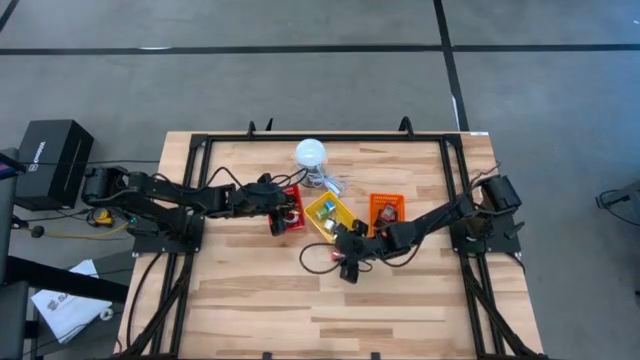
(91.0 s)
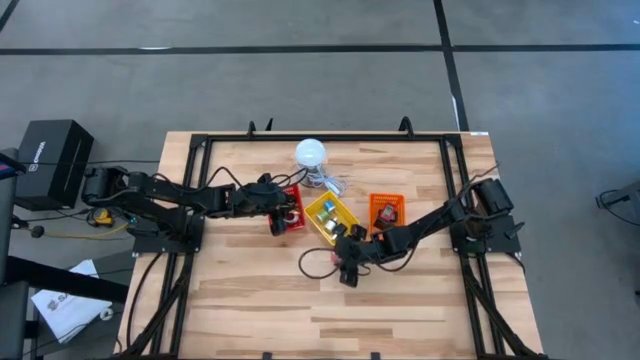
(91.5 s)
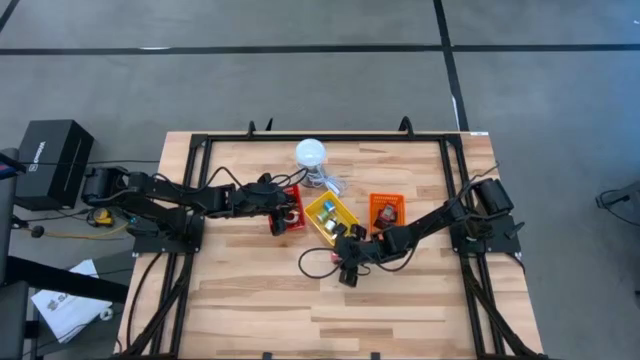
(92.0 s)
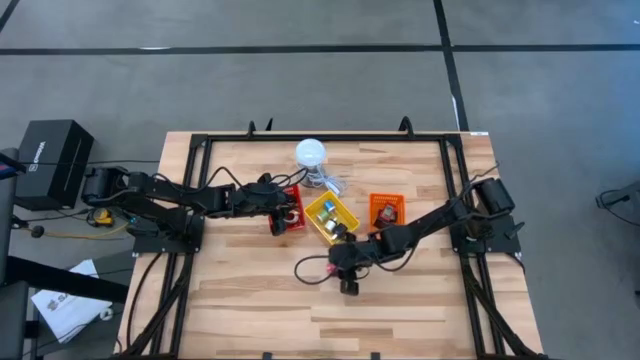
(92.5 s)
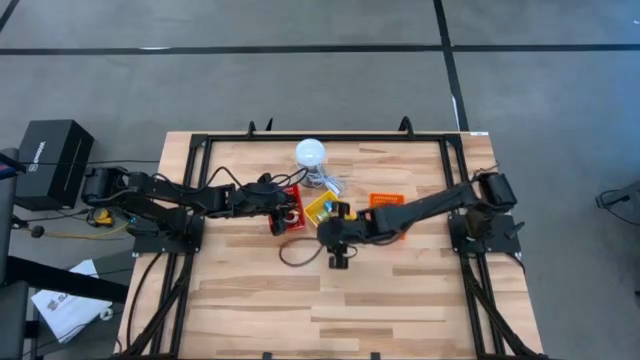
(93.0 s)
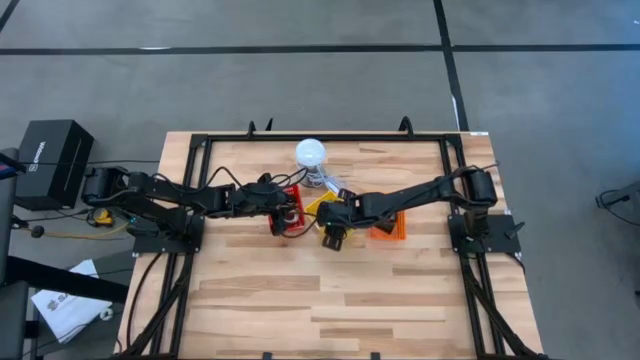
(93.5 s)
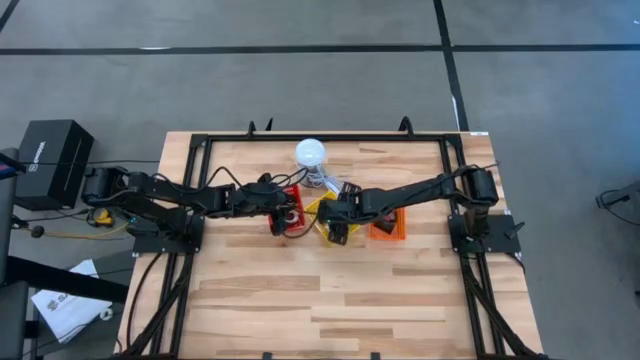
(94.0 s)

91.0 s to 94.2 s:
Task: Pick & Place Office items
Put the pink charger adapter into the yellow basket

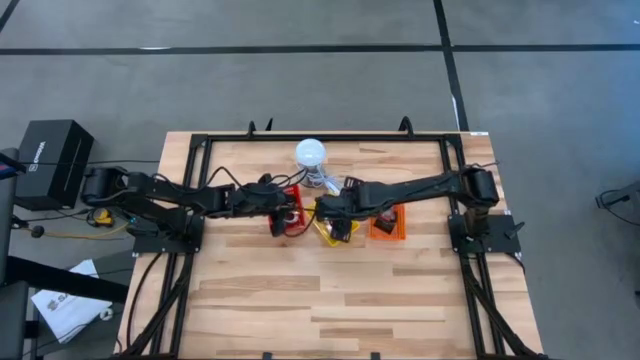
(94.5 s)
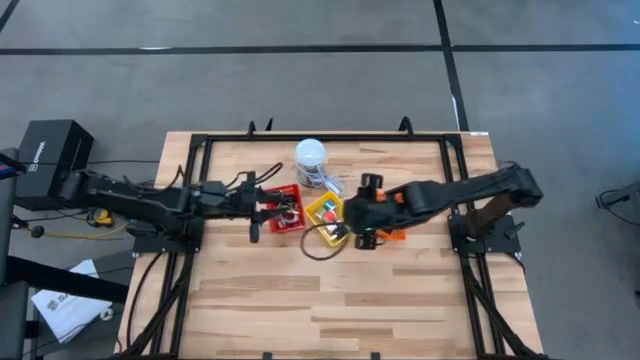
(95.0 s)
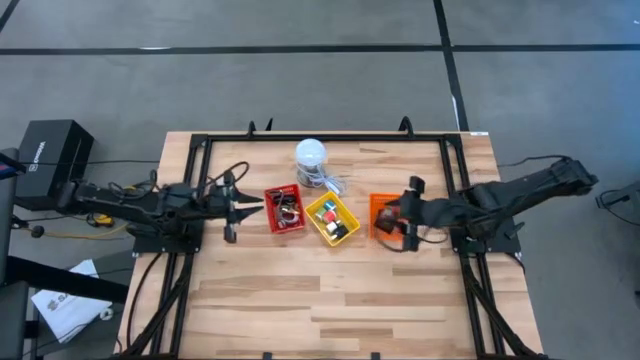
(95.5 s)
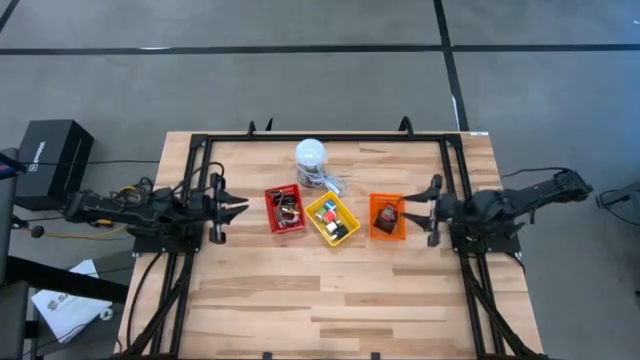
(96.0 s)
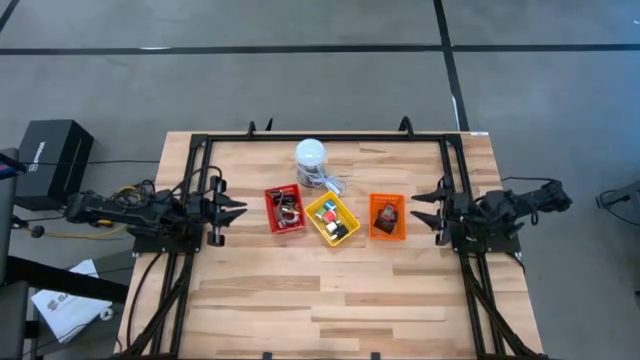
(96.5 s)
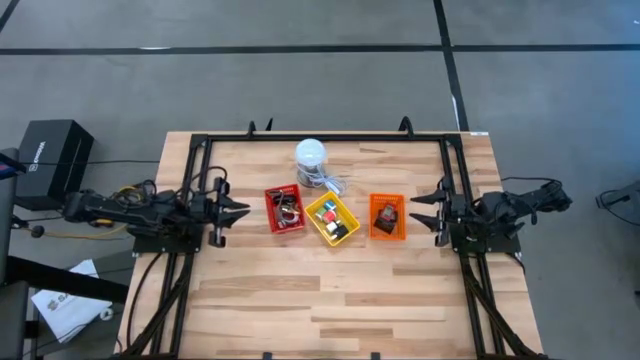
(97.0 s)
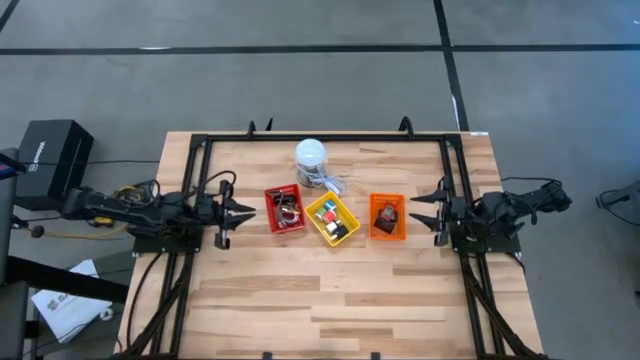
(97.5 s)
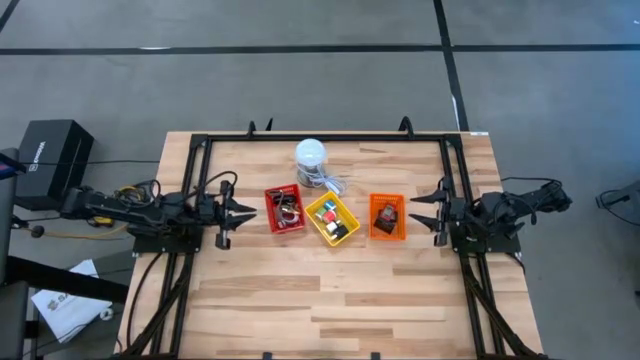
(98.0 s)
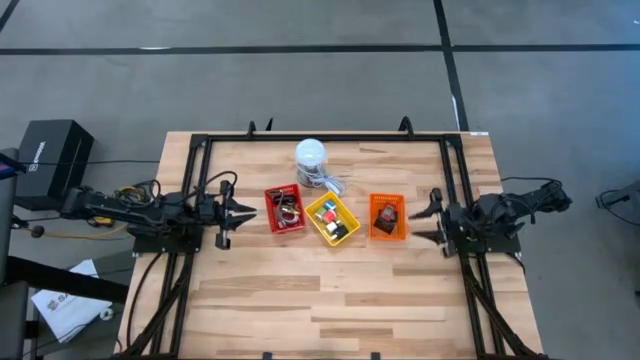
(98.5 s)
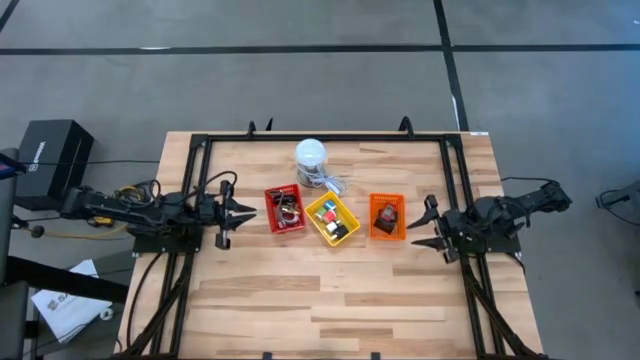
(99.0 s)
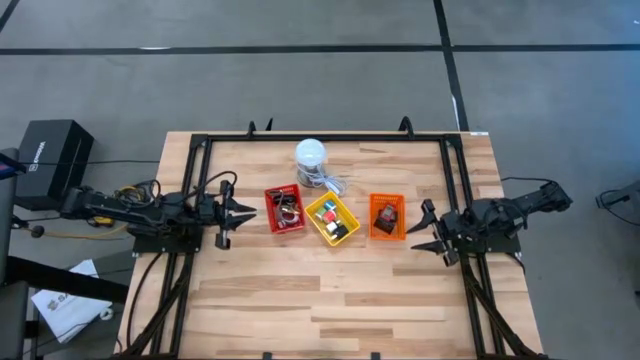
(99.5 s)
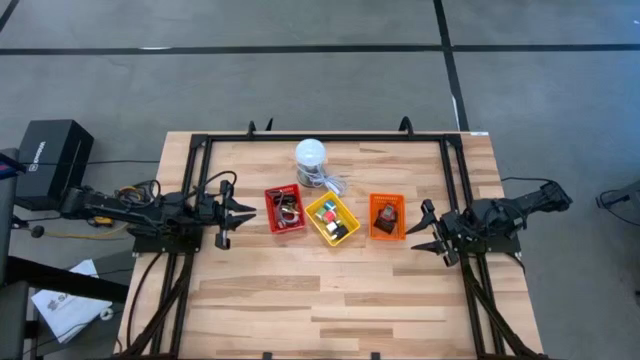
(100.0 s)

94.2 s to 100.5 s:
Return to Home Position

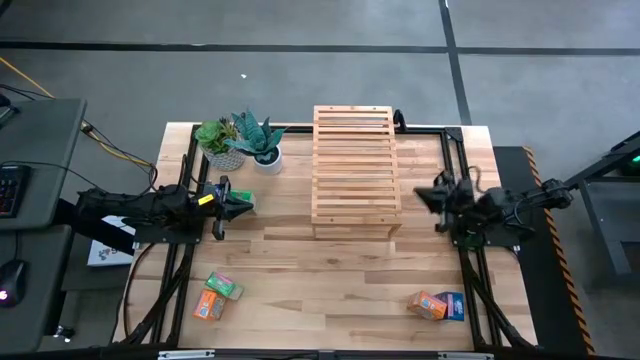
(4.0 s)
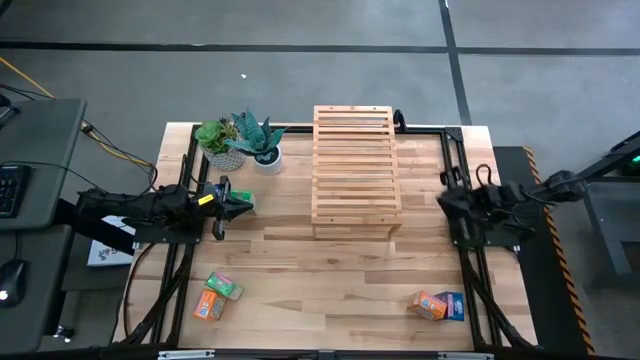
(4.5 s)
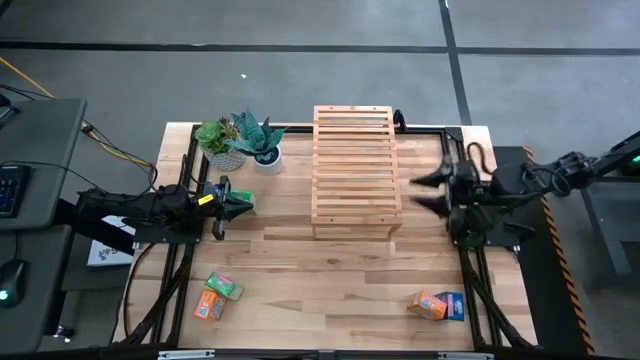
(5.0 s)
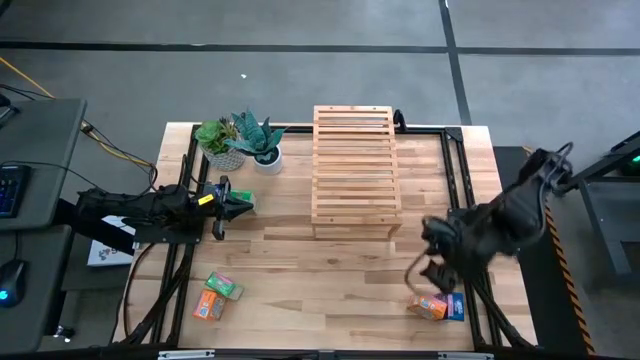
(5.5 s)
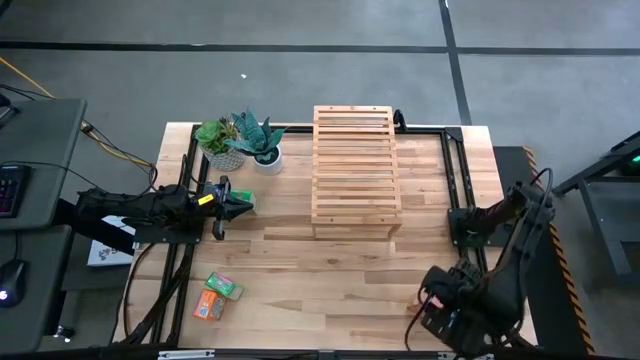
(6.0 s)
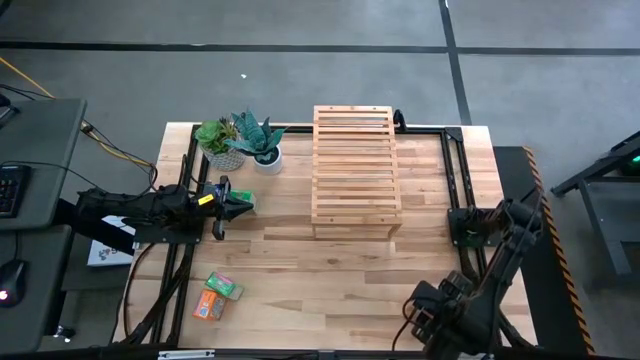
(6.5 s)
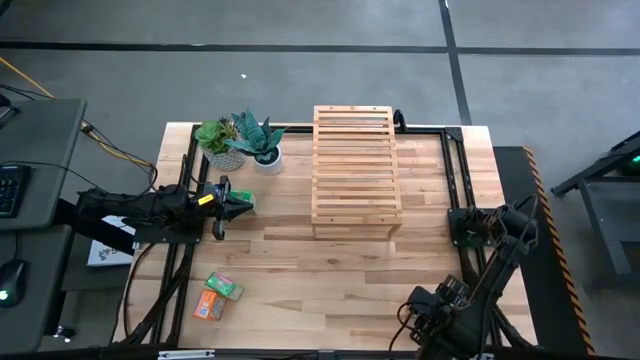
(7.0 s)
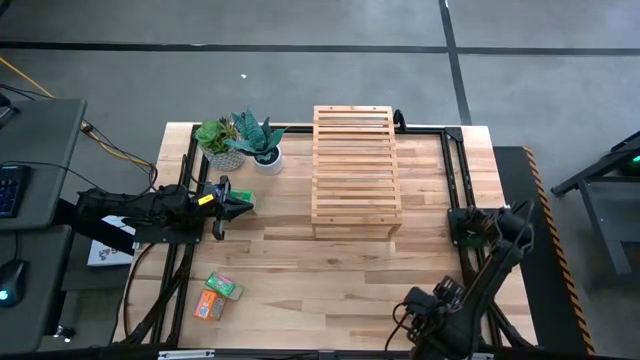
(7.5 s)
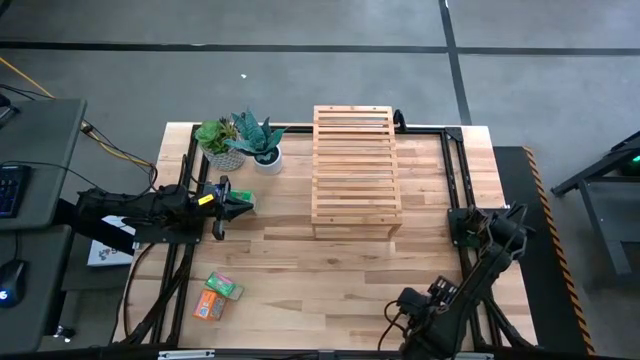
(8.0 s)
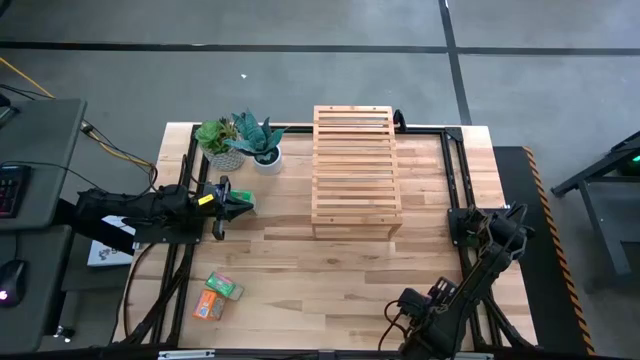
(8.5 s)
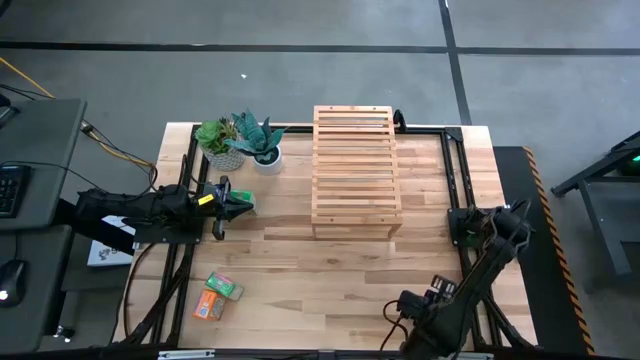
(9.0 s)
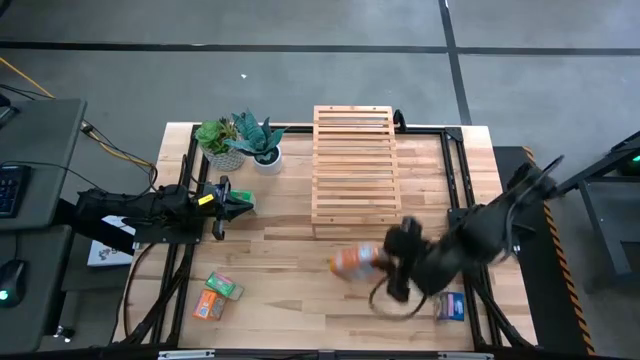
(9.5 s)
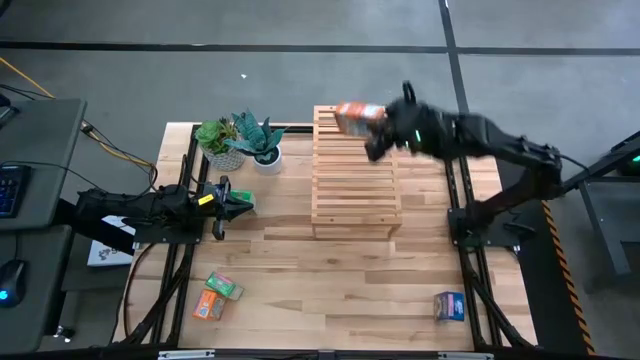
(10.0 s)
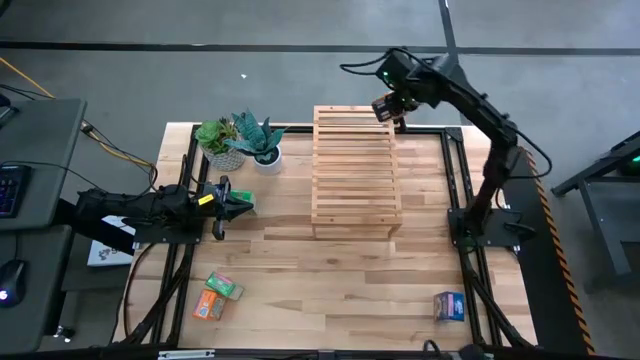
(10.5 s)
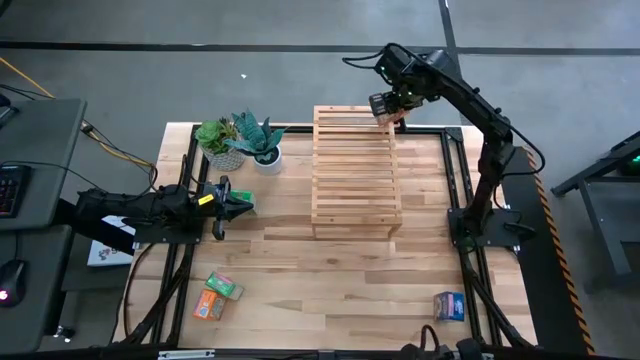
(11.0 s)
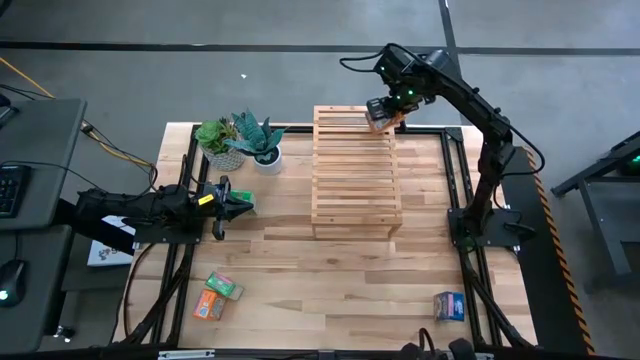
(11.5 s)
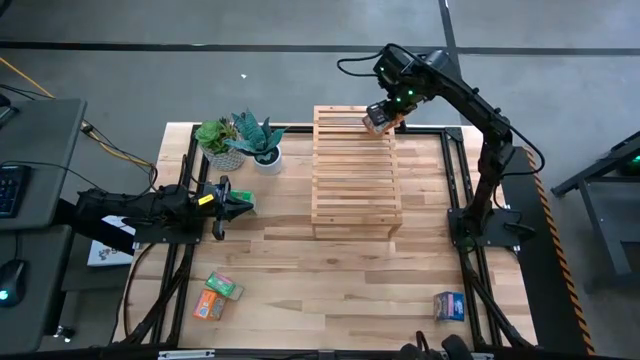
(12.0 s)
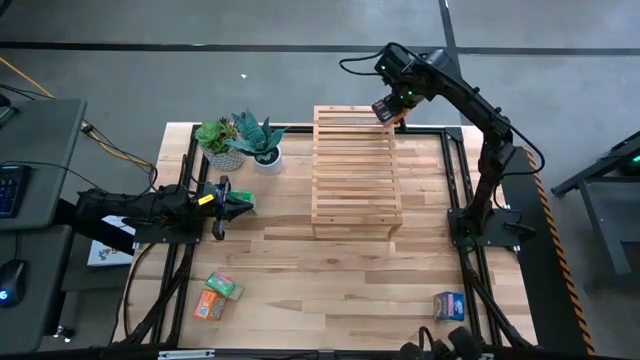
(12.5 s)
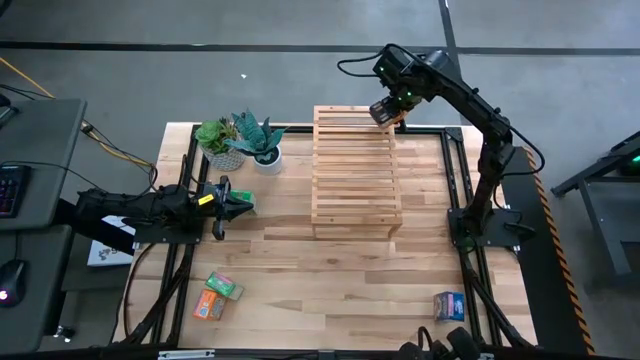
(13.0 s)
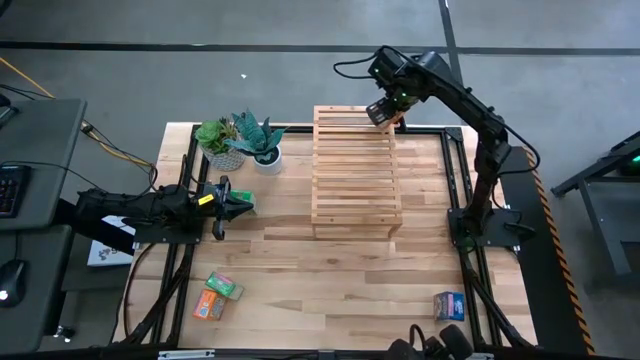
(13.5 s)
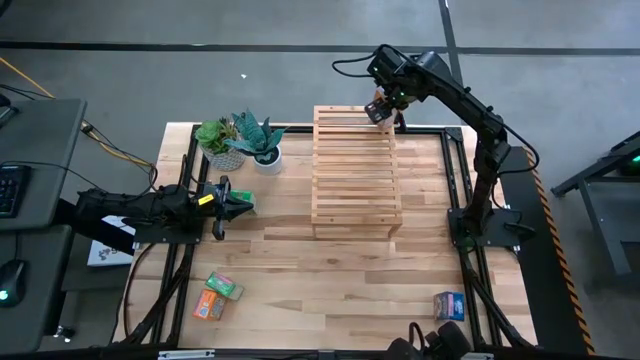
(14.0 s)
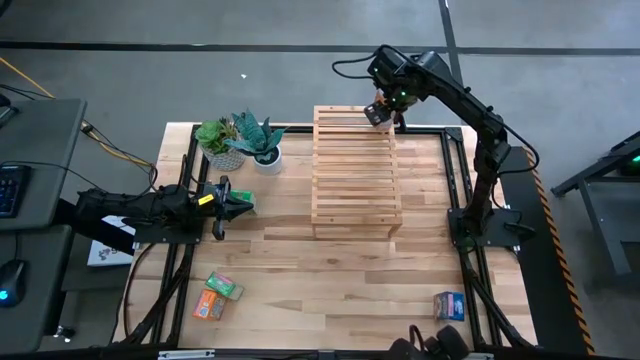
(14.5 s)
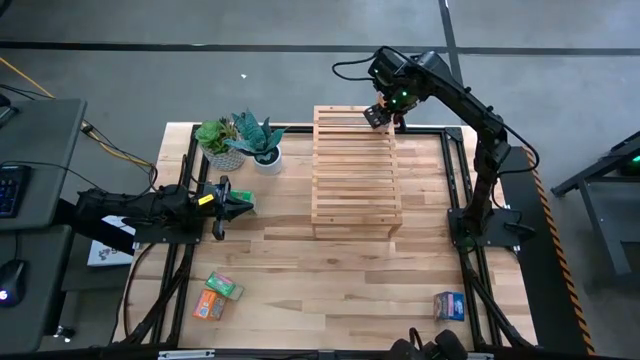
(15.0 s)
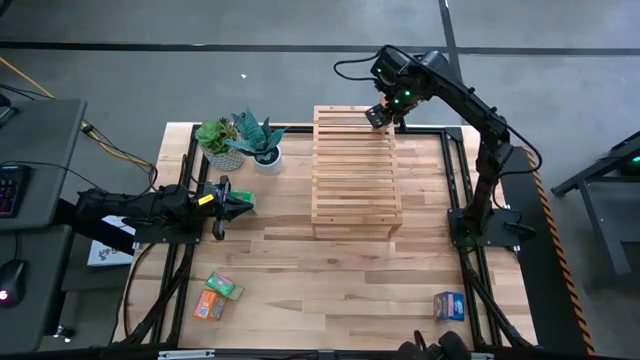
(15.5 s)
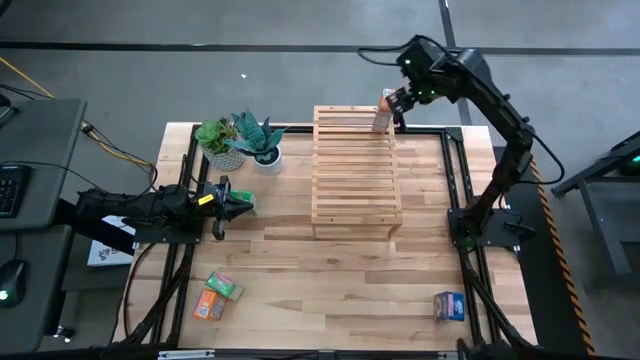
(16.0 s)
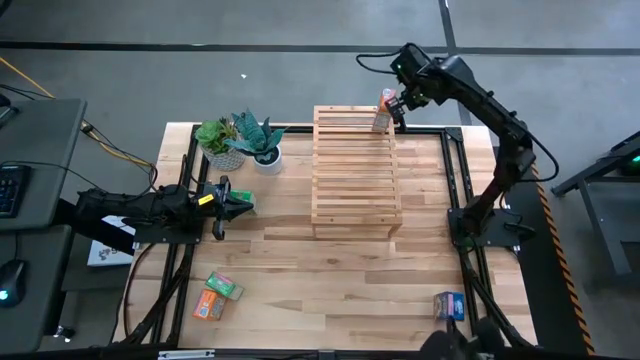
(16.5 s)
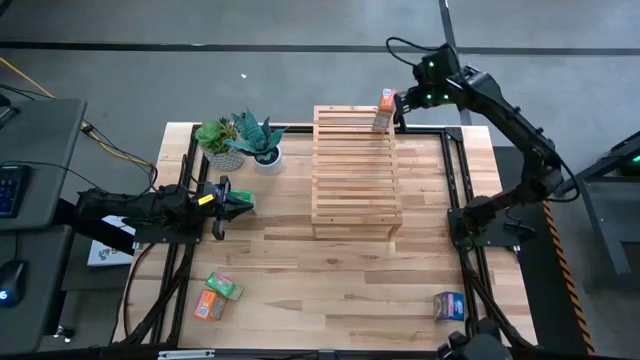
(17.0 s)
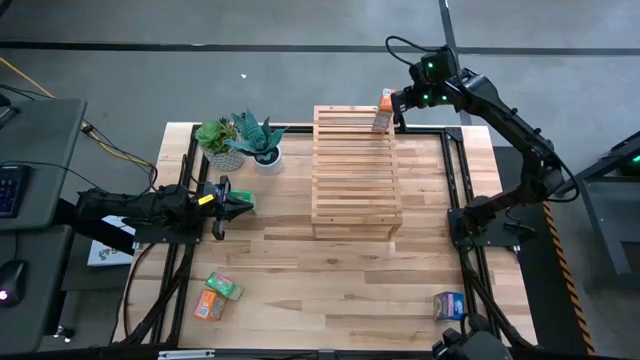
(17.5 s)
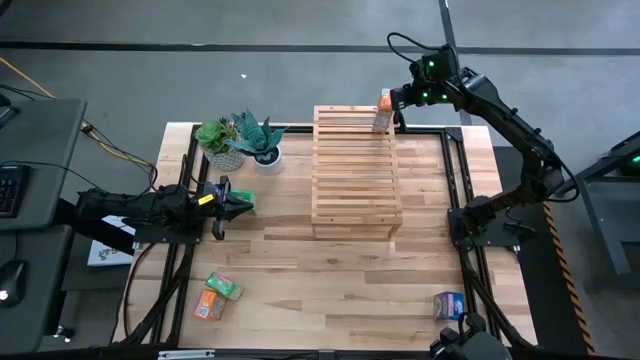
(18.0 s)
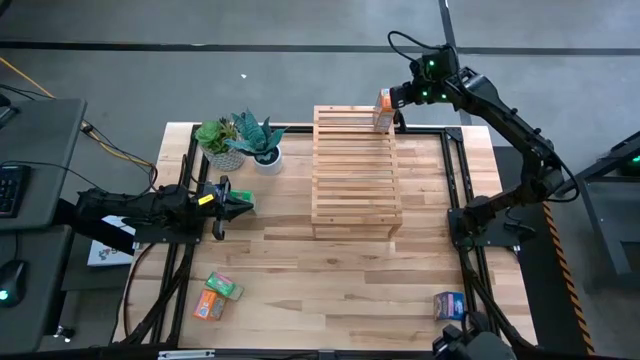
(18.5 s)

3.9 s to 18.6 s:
Task: Stack cereal on shelf
Put the bottom right orange cereal box on the shelf
